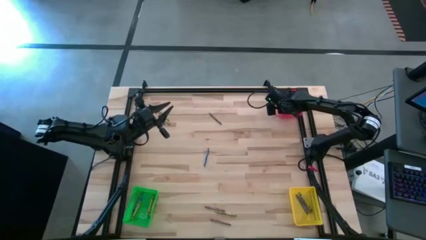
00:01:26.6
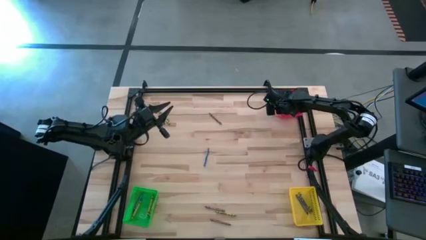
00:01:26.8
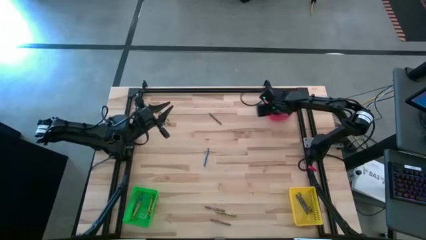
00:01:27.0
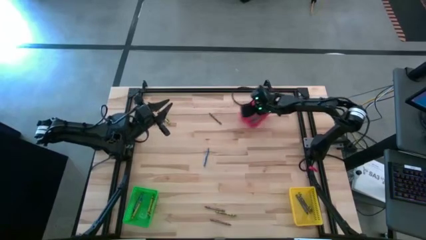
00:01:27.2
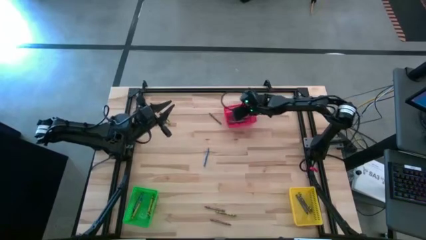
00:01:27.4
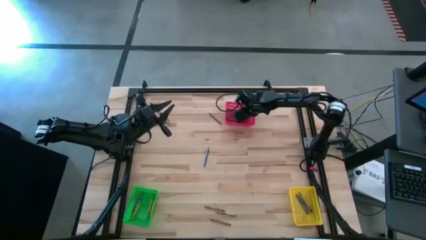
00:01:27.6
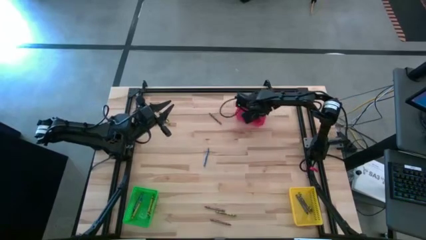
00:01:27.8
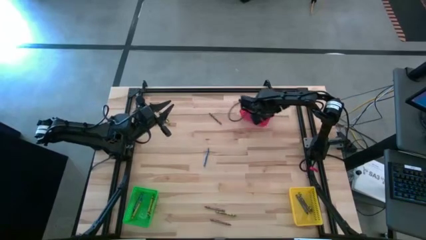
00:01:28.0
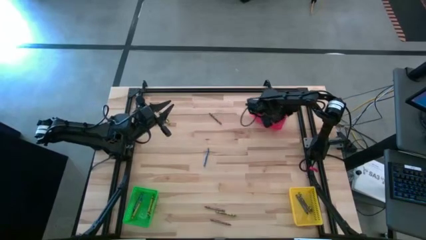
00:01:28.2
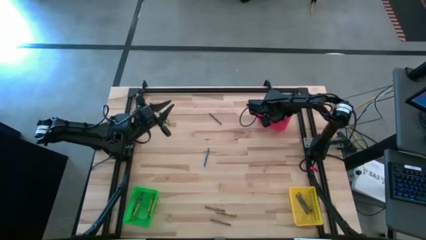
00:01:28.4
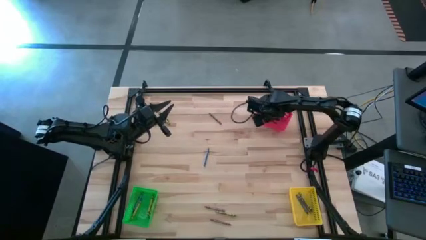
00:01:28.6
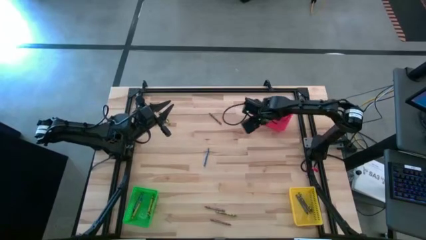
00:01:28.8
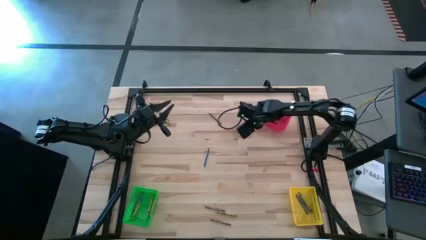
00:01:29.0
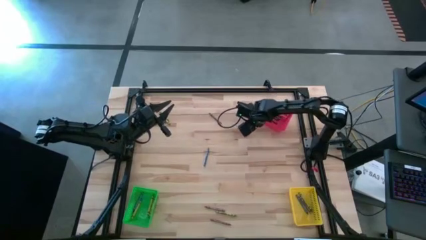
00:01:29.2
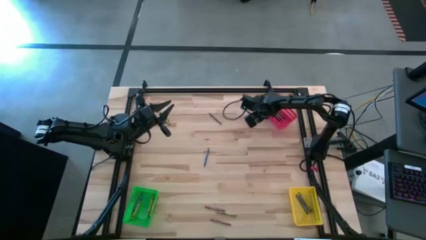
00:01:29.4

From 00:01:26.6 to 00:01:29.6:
Task: Sort crayons
Adjust the red bin

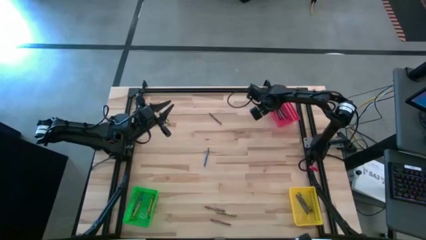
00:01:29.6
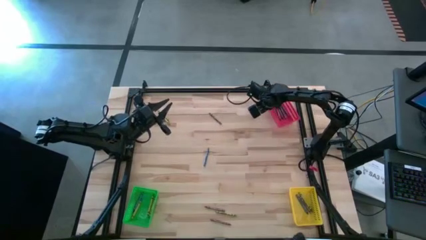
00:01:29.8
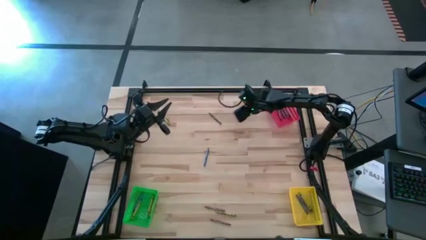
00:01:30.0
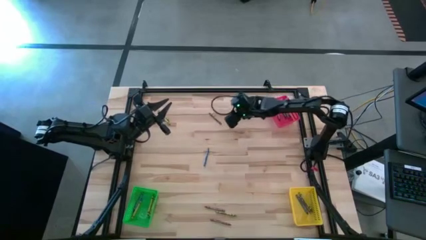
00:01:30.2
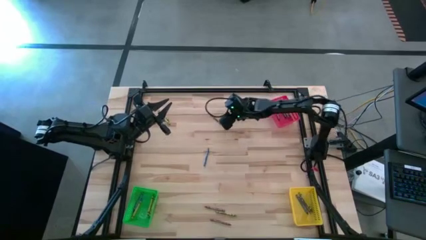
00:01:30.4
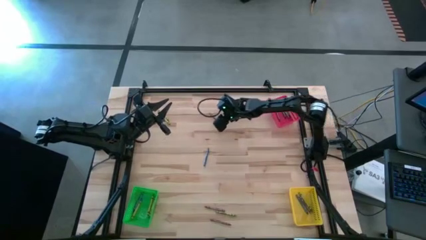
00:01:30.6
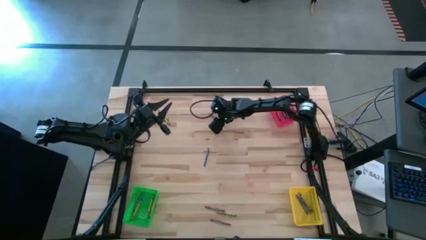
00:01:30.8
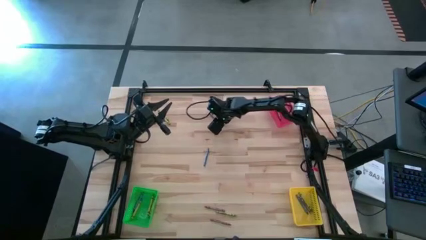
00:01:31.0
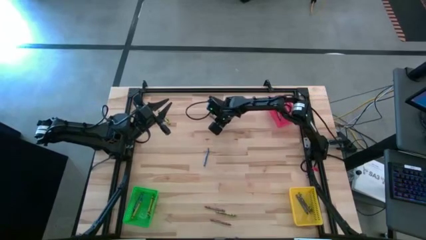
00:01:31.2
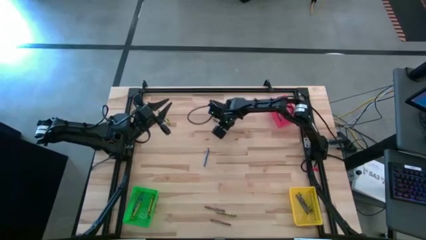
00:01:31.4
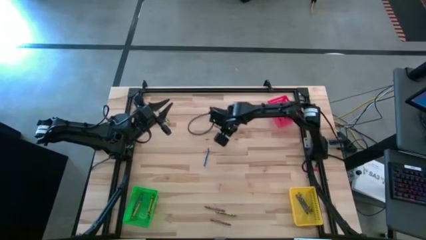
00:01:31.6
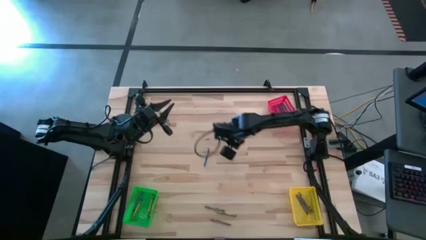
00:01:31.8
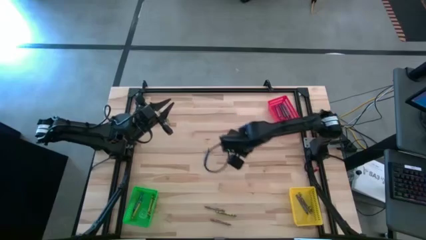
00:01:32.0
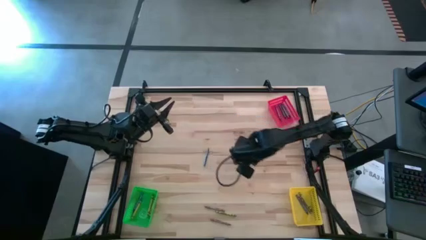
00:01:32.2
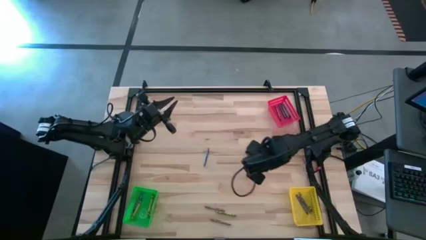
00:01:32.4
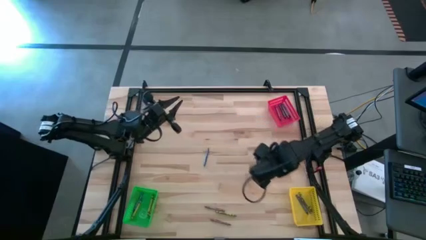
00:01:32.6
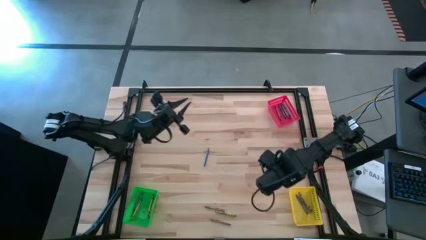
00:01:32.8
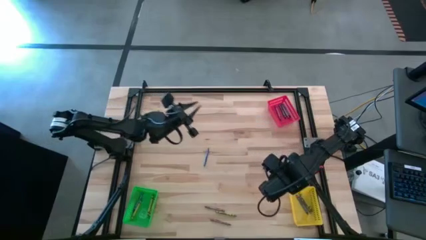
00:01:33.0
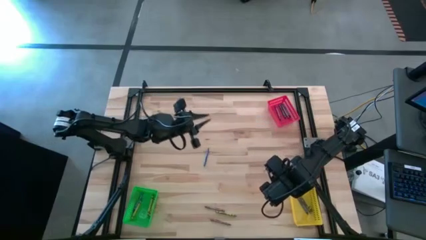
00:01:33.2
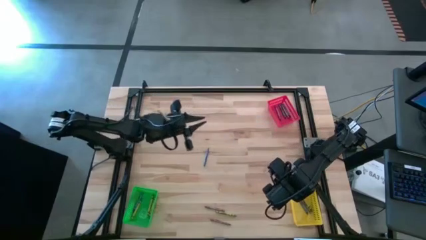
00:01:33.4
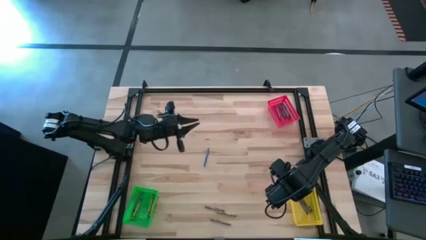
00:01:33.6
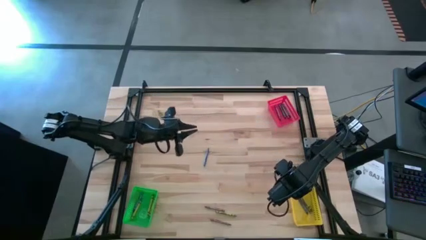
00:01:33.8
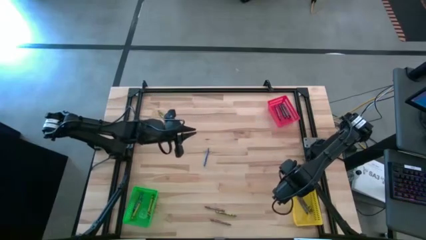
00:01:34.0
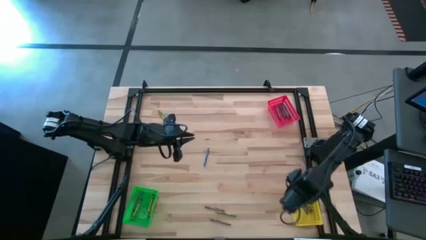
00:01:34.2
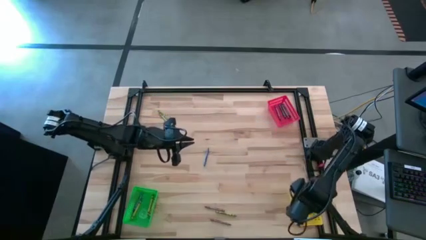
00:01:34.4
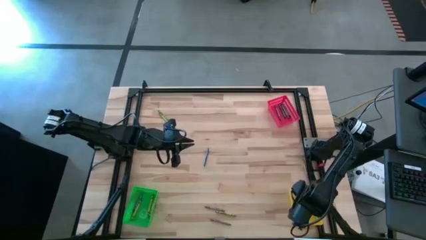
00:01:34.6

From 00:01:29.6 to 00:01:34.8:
Put the brown crayon into the yellow bin

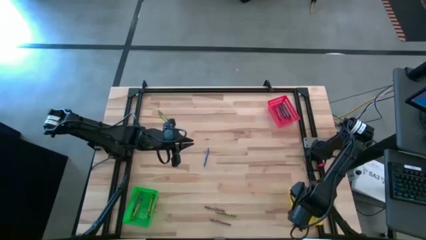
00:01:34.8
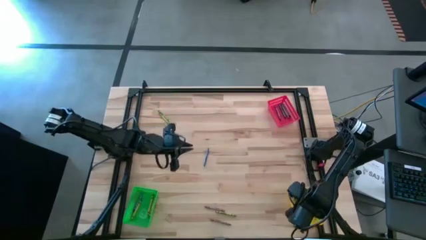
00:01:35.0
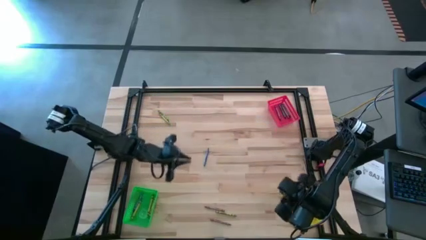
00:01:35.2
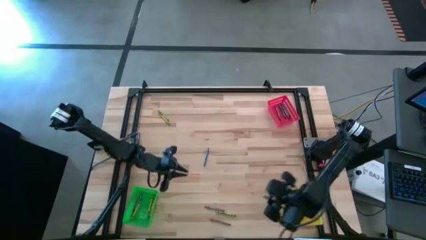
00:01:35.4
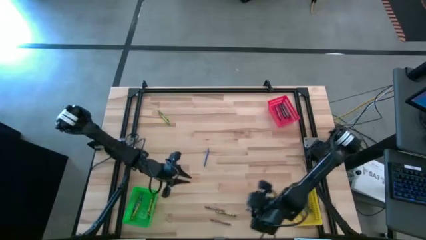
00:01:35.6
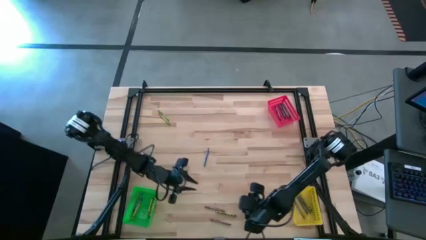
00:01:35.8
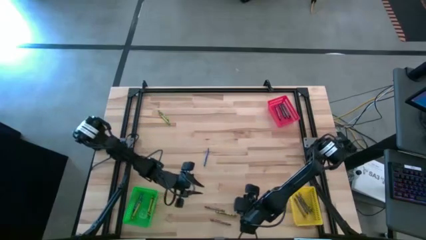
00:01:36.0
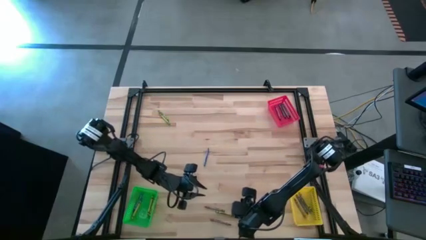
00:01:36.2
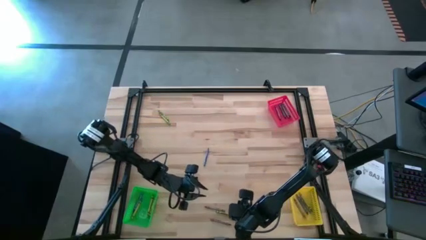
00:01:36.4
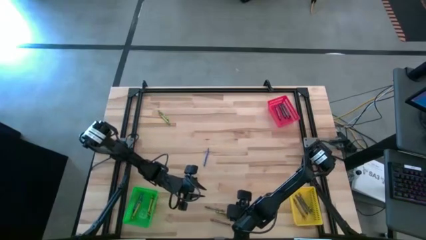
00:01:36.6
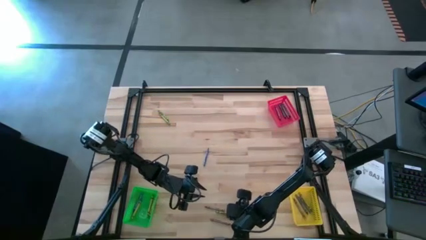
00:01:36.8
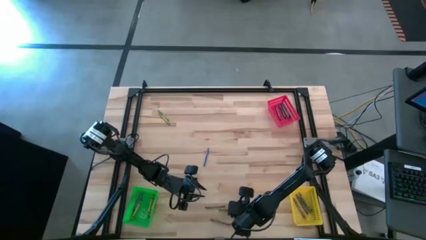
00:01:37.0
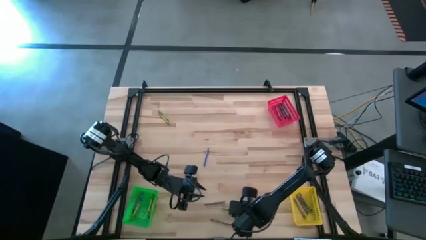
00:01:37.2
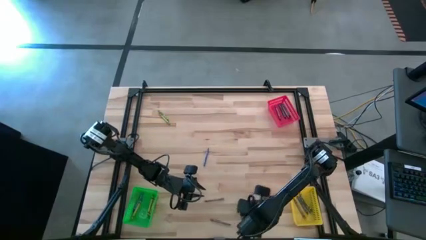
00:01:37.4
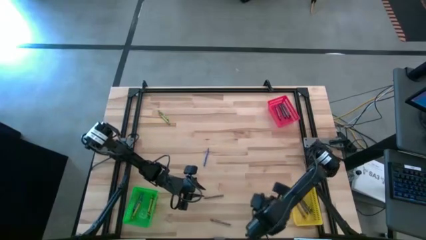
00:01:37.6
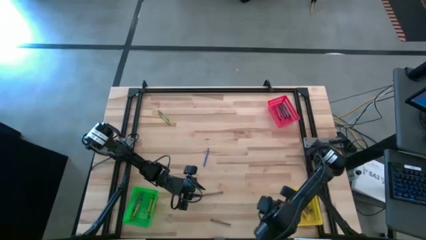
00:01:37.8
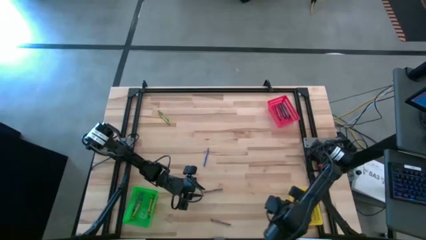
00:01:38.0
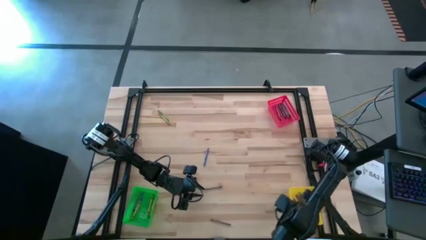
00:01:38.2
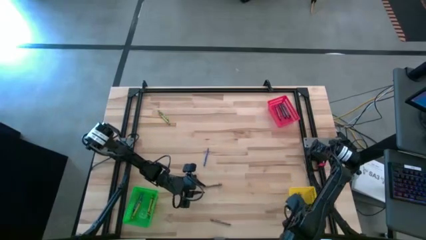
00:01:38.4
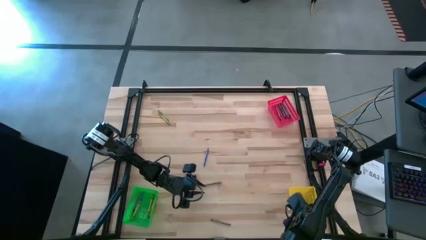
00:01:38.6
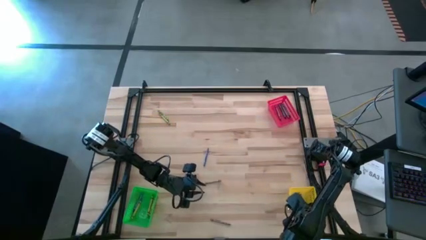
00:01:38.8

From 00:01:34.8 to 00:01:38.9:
Put the green crayon into the yellow bin

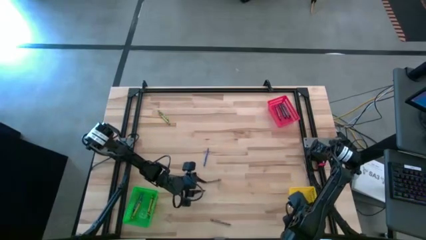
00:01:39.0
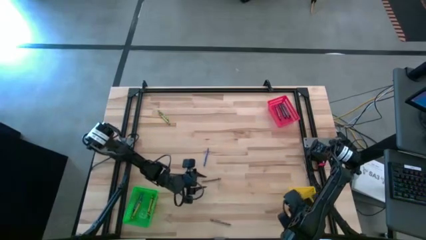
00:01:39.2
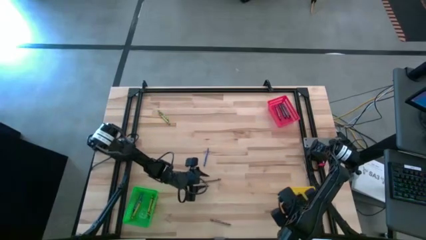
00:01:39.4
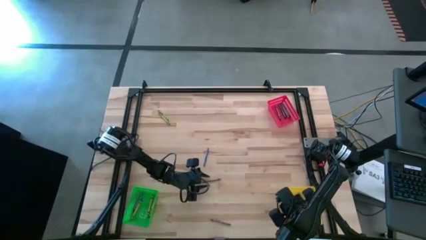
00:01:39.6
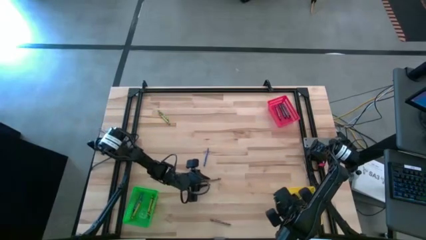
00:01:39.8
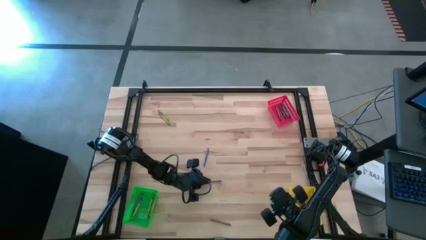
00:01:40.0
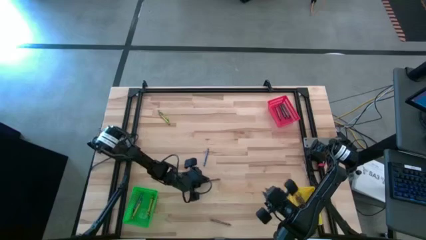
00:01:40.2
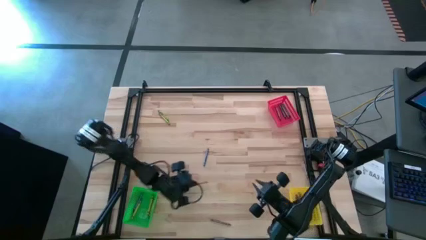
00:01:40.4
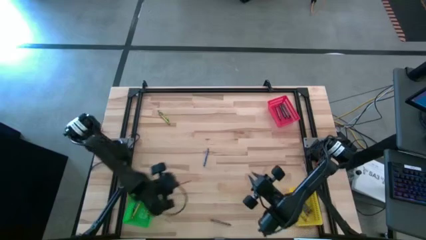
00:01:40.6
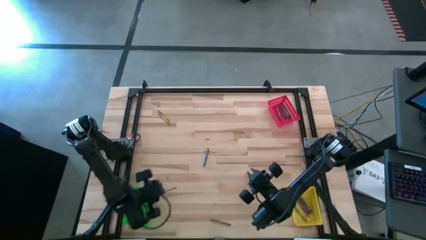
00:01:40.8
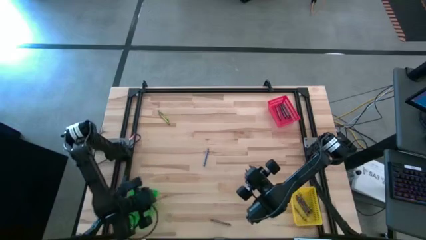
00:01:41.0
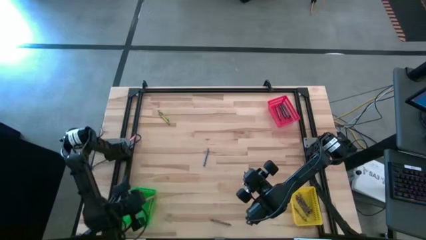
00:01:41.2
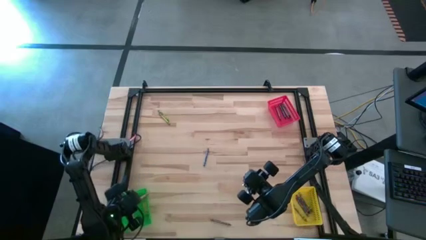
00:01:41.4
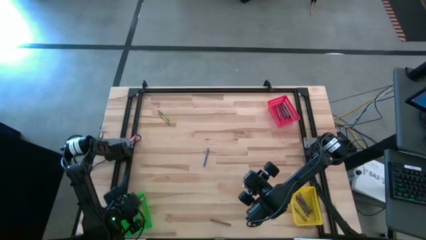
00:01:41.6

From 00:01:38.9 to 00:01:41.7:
Put the brown crayon into the green bin

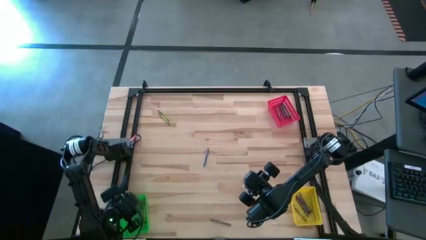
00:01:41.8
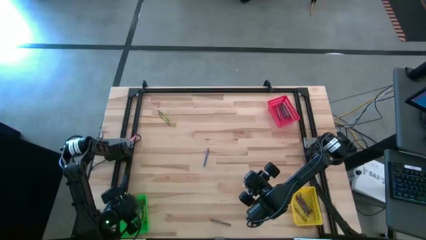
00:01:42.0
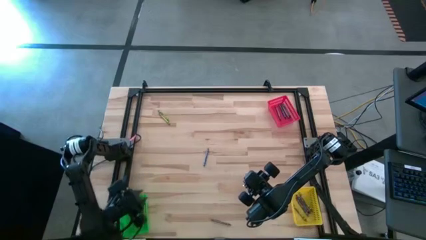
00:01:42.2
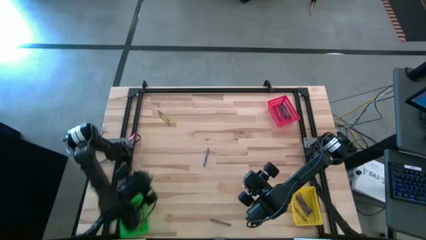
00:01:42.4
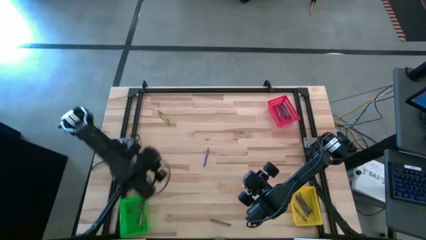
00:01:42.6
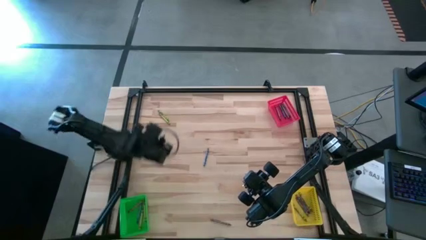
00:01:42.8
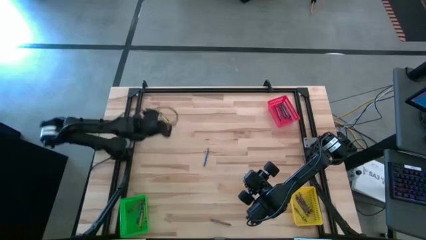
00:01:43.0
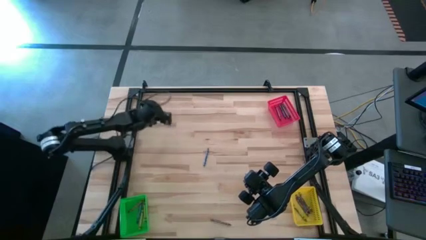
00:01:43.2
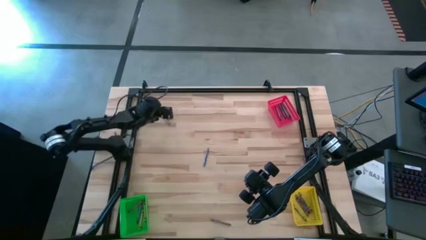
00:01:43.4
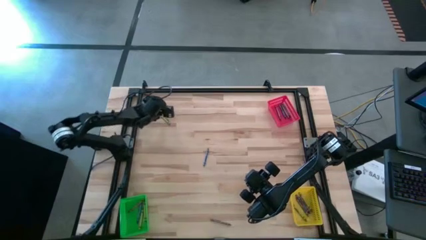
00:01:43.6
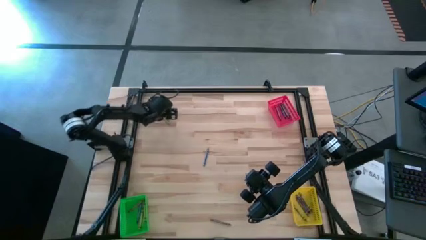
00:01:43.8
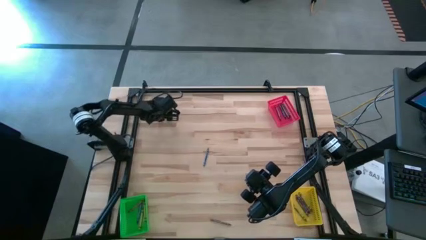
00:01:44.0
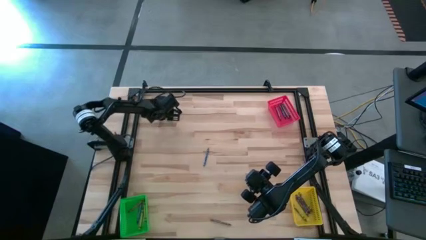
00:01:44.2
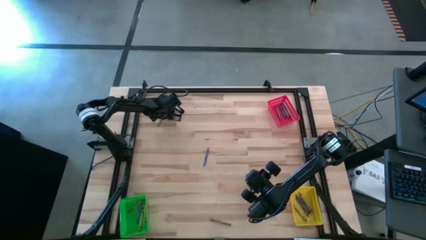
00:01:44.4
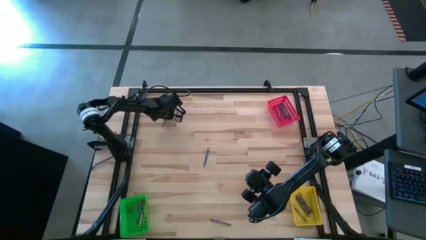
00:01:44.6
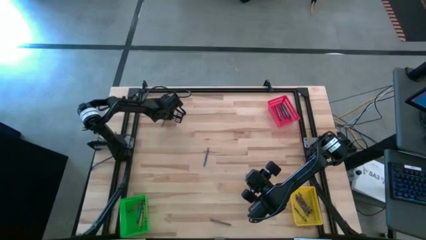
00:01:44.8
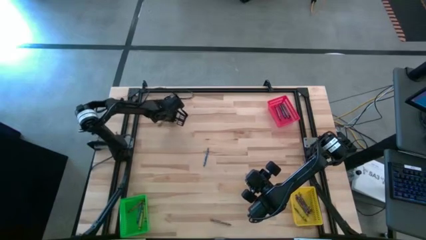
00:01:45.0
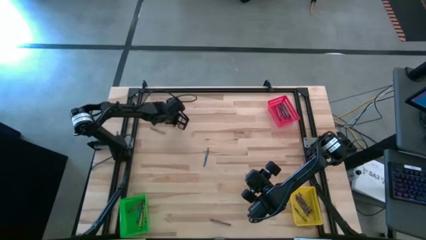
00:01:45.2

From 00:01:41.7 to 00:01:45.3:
Put the green crayon into the green bin
